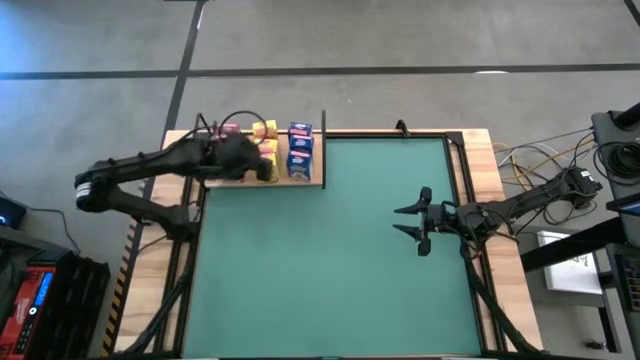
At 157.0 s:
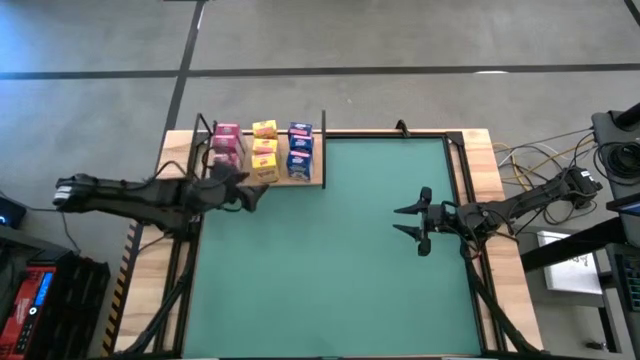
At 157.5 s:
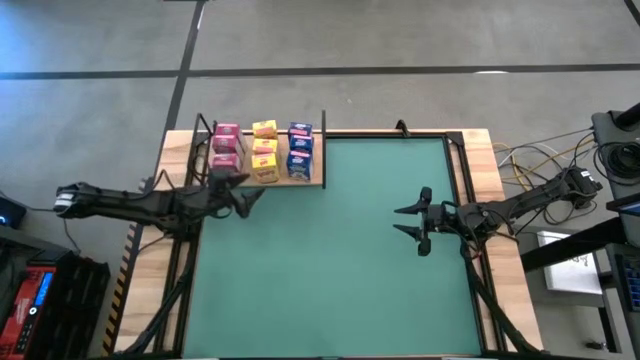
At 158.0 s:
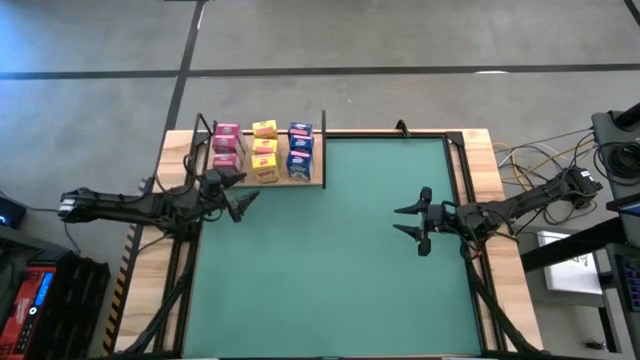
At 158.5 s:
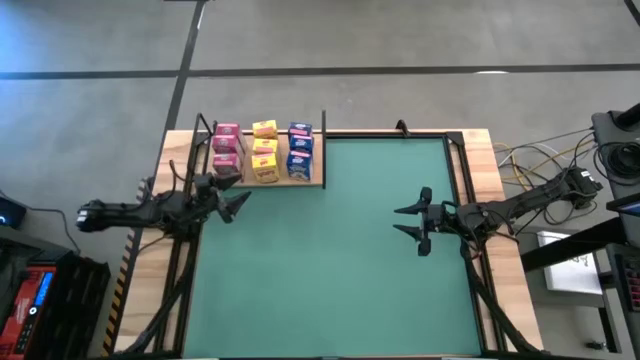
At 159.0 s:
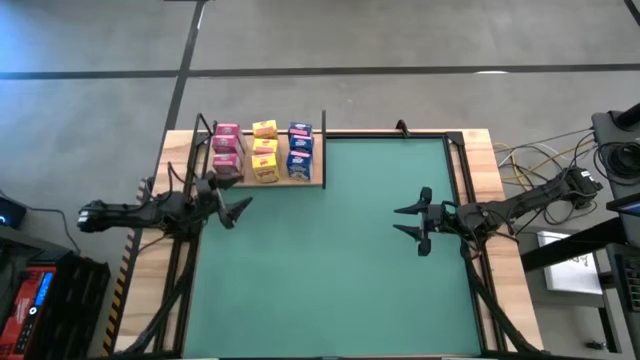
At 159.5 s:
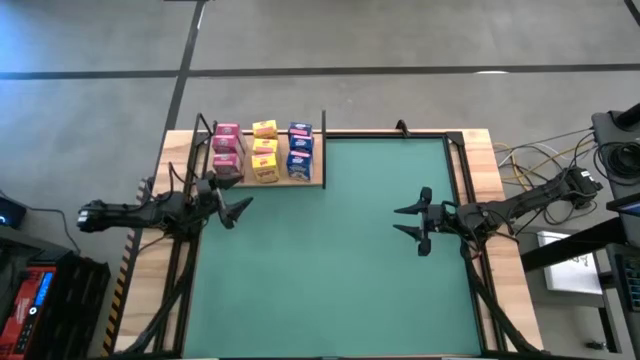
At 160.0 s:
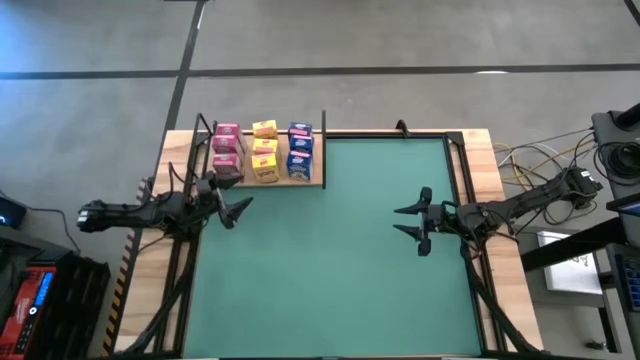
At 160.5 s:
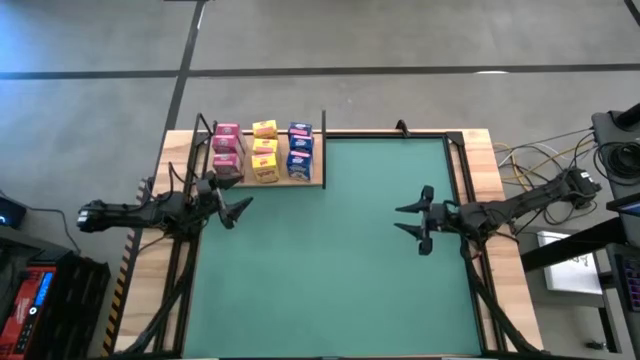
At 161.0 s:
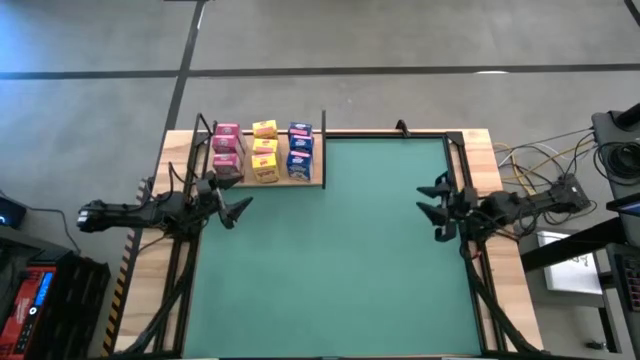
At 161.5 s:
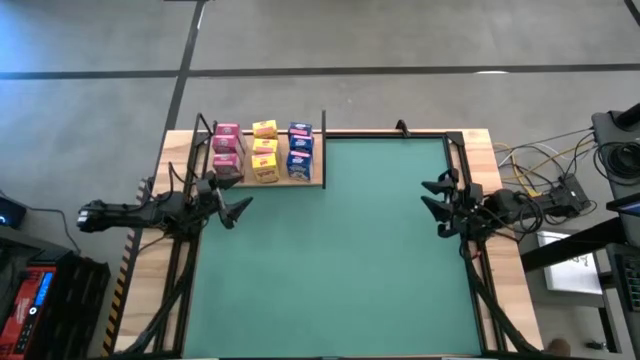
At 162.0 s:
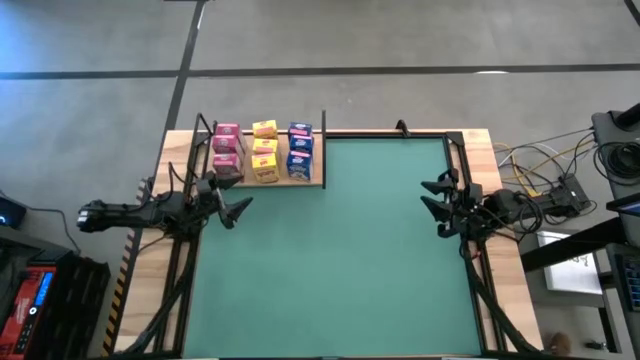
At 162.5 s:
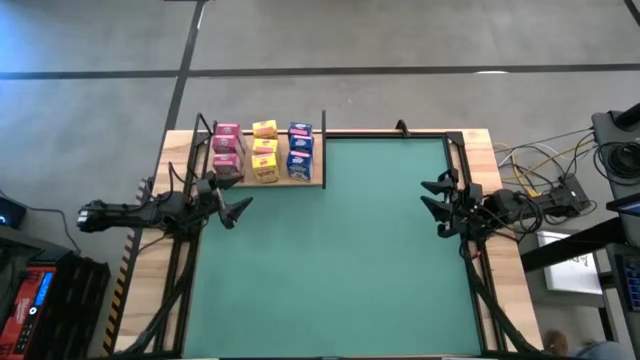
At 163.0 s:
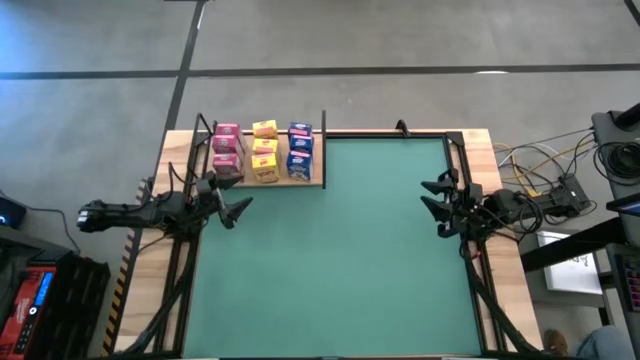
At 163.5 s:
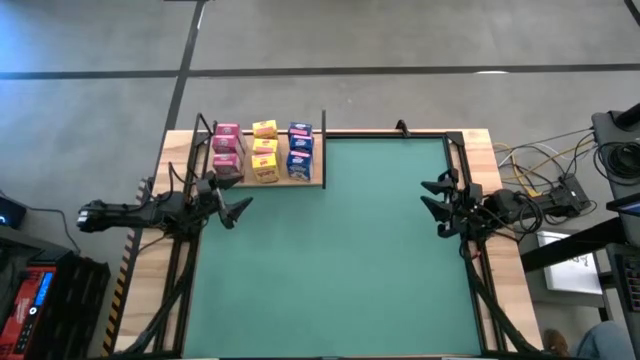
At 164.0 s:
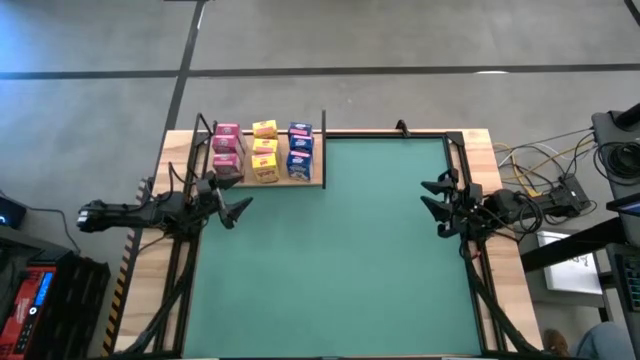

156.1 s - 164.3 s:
Task: Stack cereal on shelf
Return to Home Position

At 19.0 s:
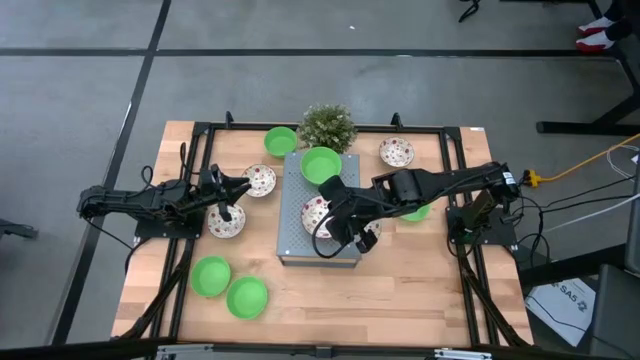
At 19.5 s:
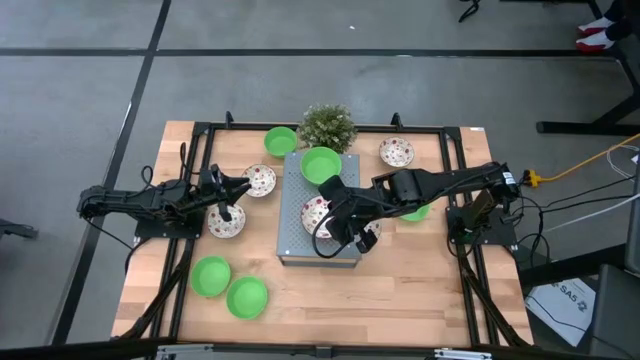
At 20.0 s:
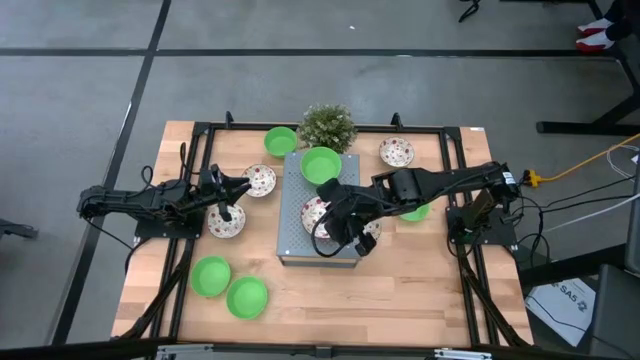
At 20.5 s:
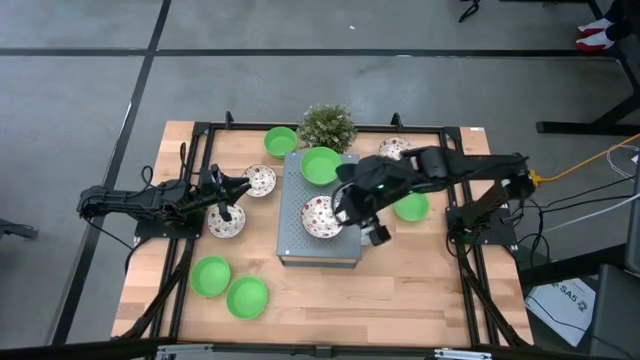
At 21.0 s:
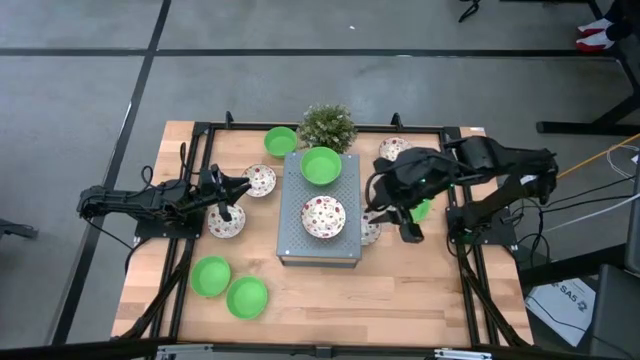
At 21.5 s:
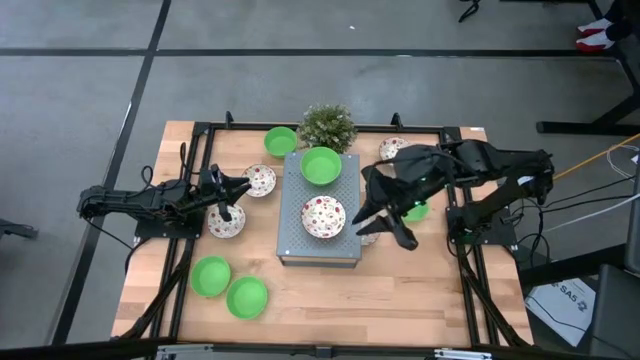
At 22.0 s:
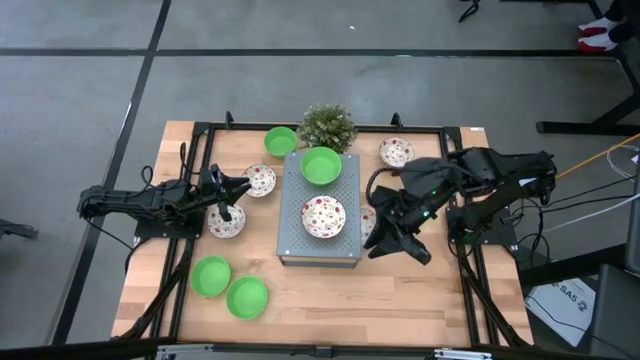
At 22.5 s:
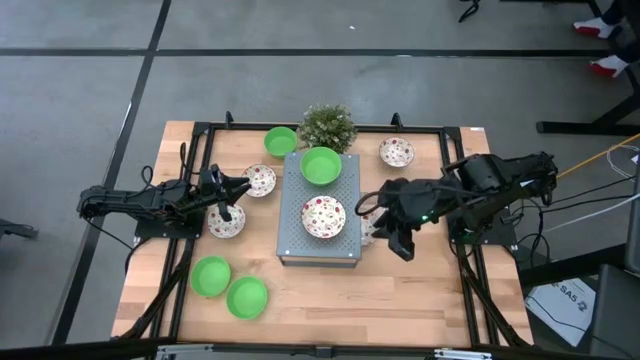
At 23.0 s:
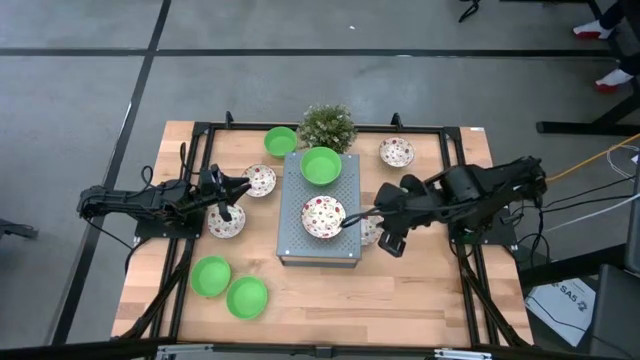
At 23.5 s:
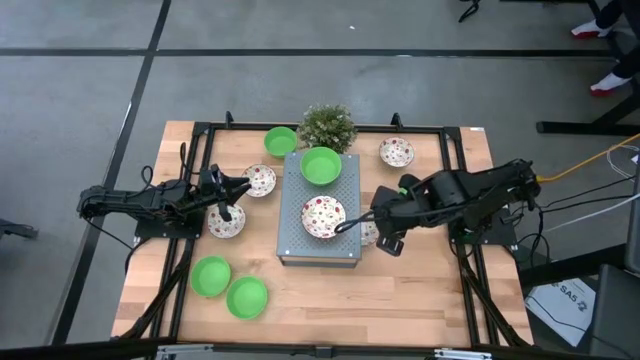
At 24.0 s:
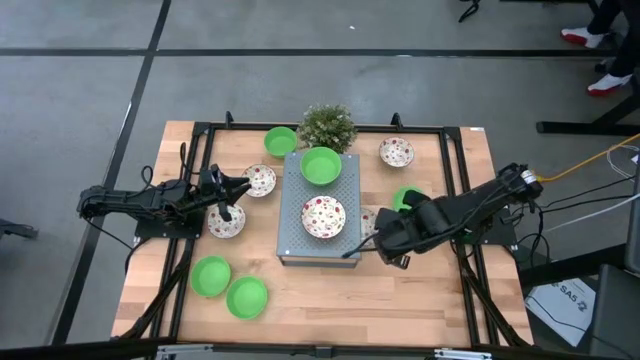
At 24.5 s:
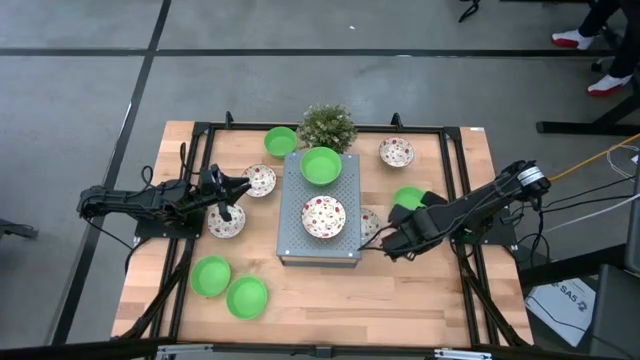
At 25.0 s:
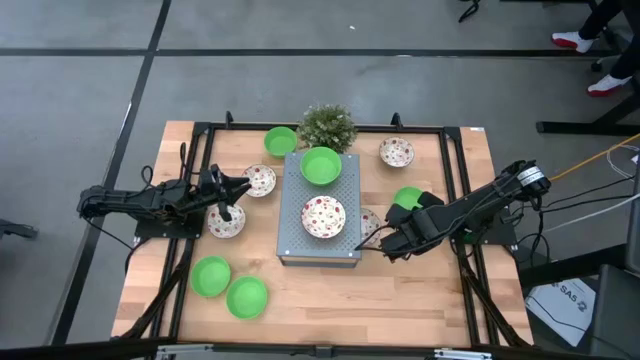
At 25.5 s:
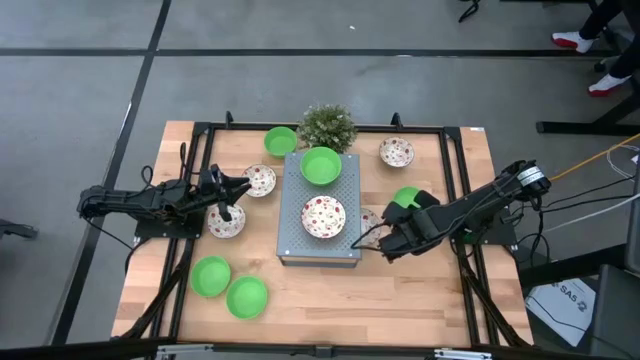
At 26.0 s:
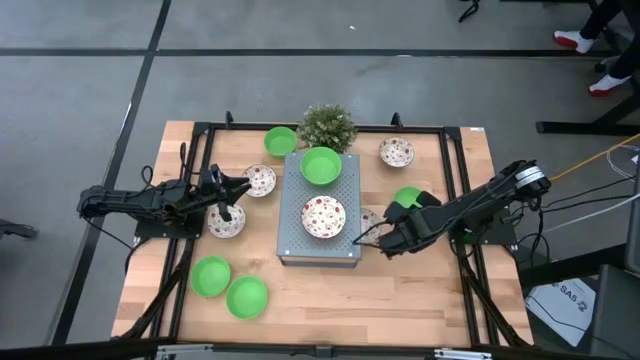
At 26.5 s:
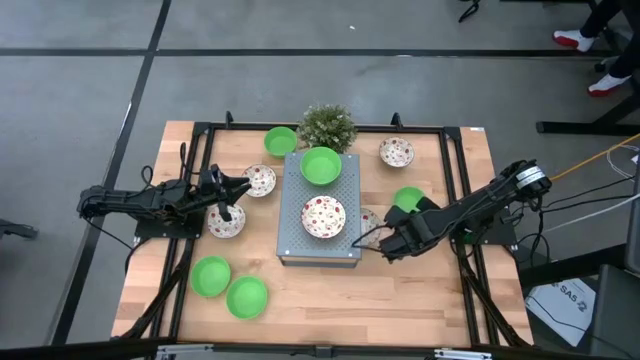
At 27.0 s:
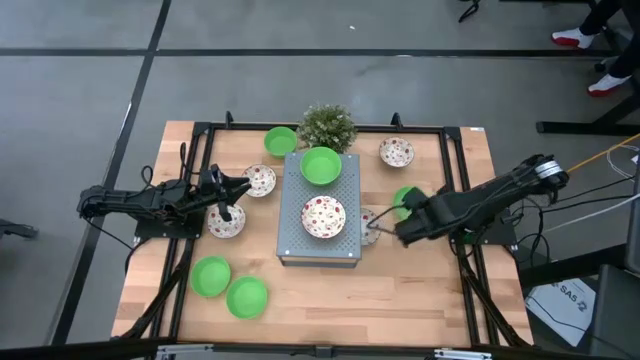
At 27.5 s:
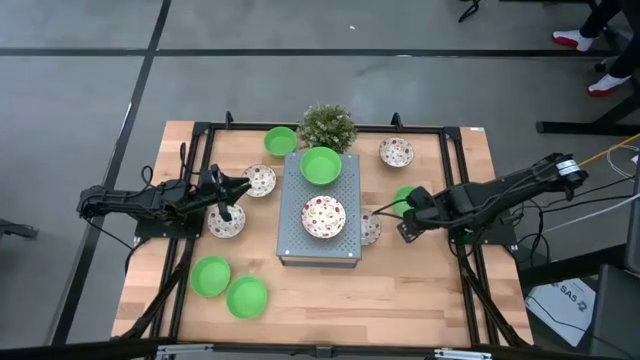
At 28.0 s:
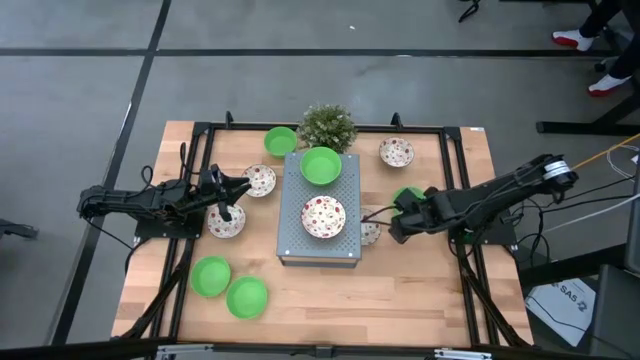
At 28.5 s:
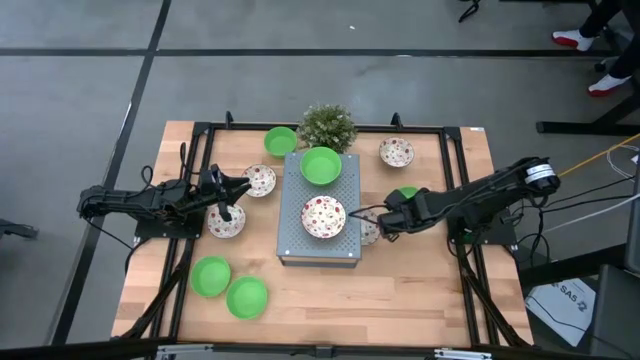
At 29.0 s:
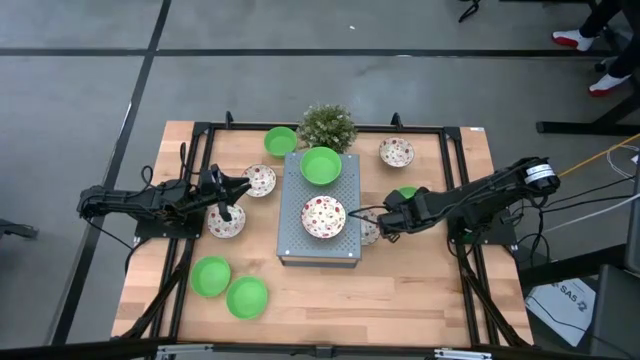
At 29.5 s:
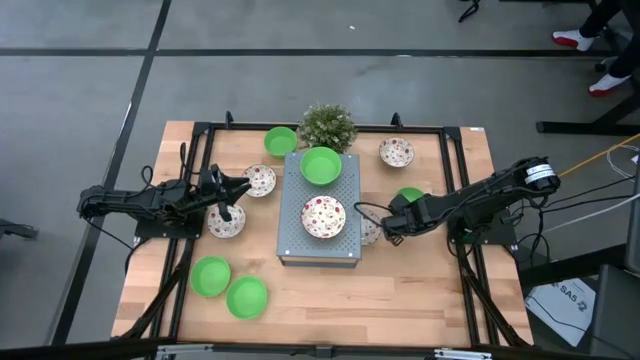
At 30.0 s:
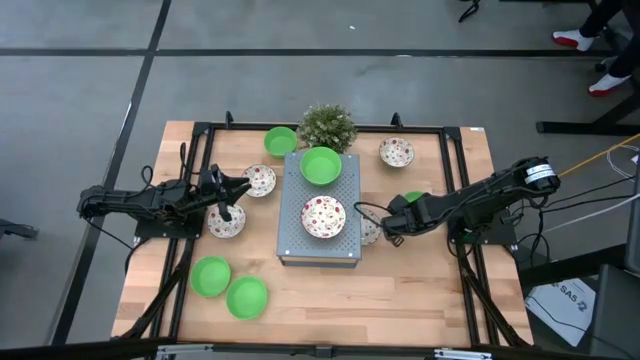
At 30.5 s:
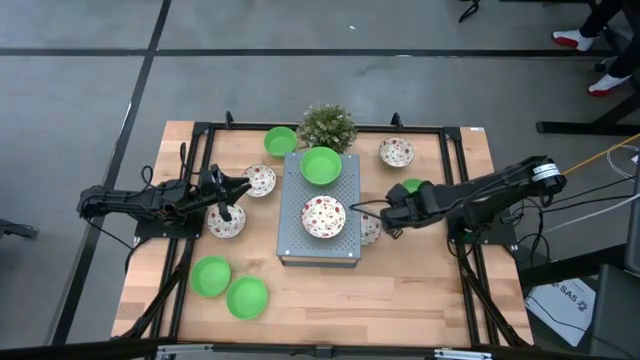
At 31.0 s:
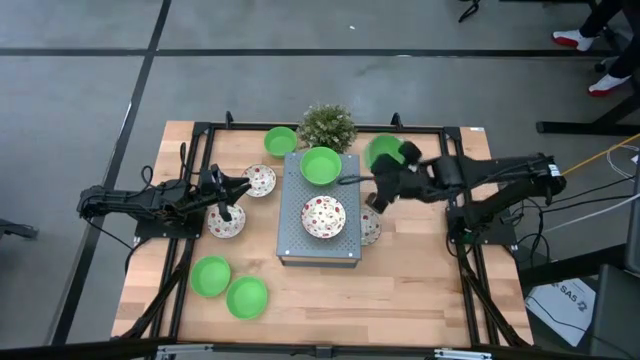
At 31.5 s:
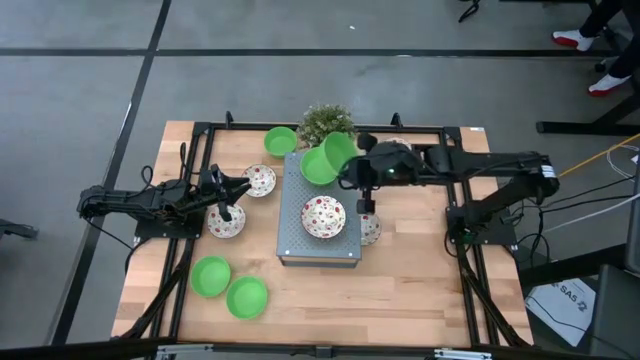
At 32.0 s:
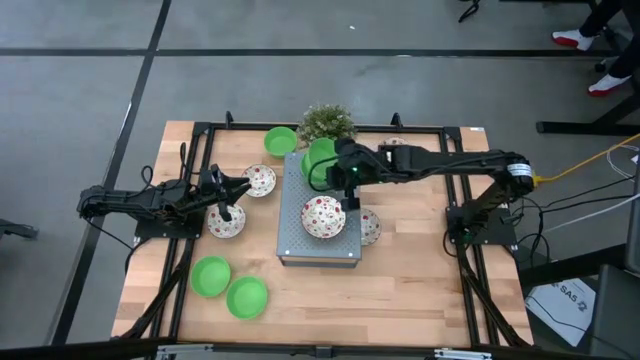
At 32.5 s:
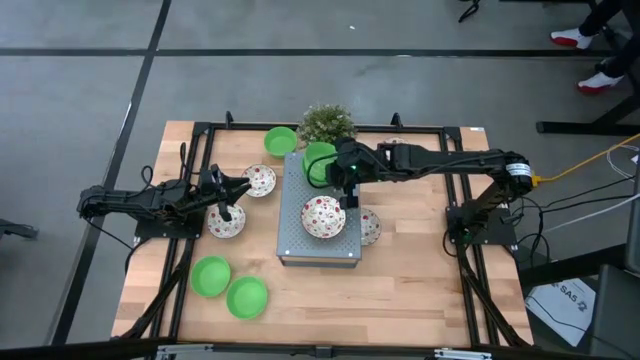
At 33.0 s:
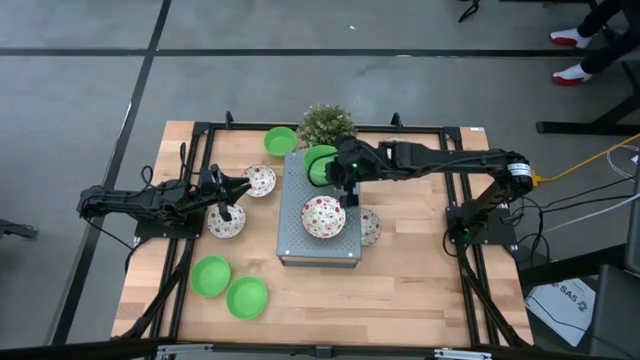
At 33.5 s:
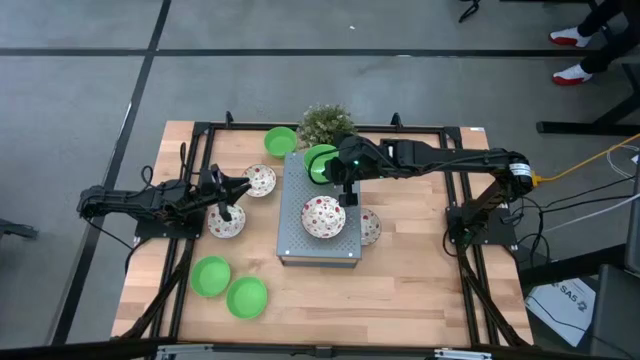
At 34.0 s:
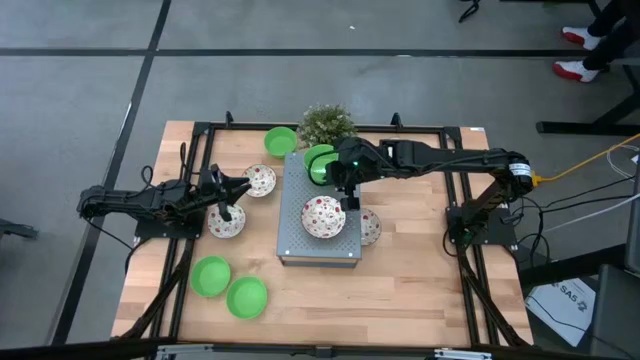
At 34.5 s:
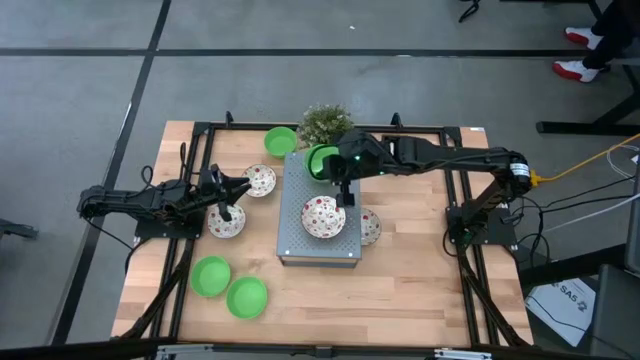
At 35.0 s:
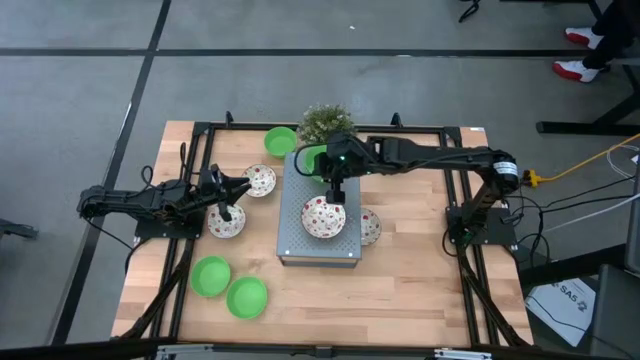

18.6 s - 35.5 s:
Task: Pick & Place Mini bowls
Stack the green bowl on the green bowl on the shelf
